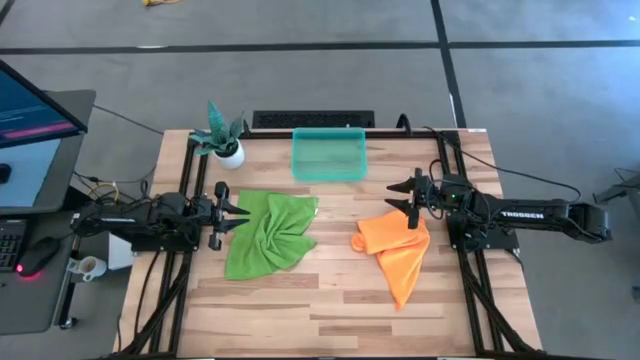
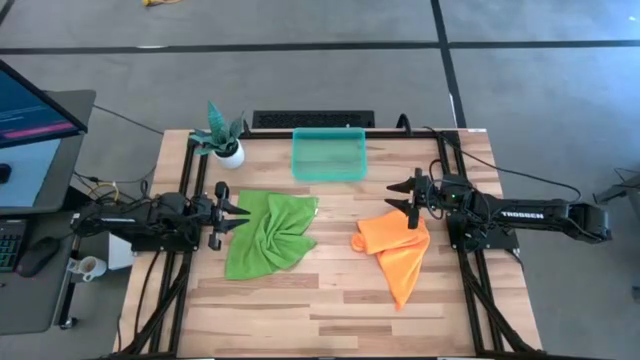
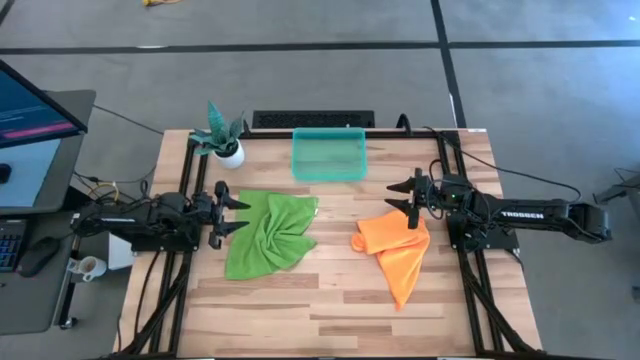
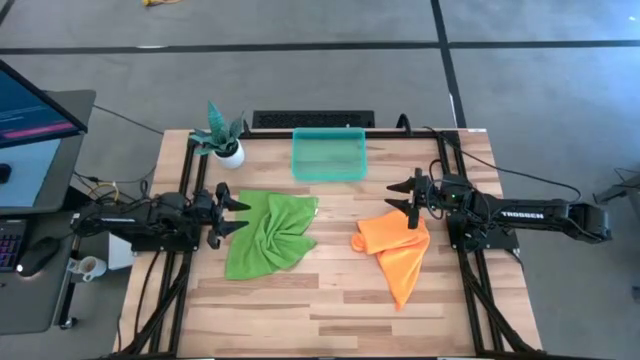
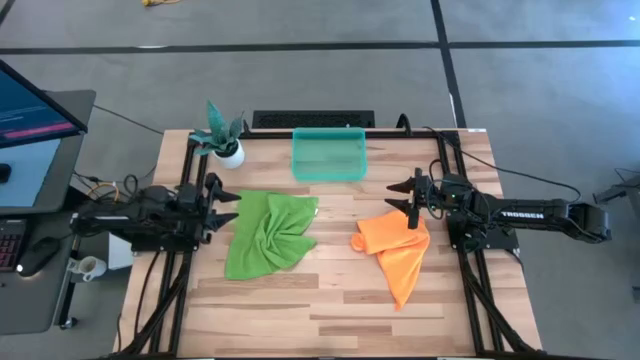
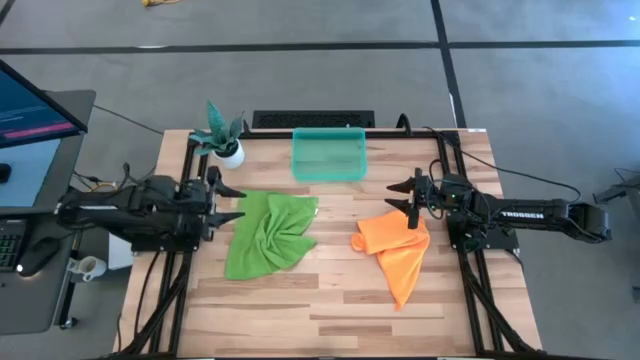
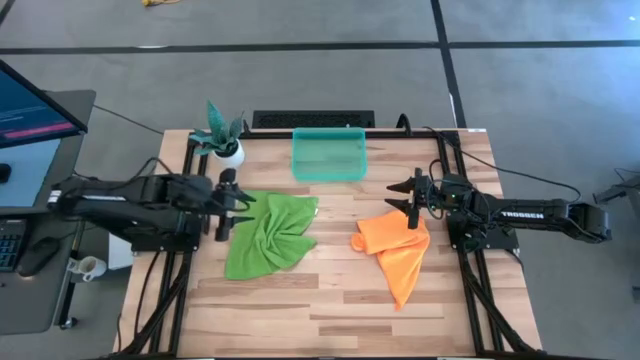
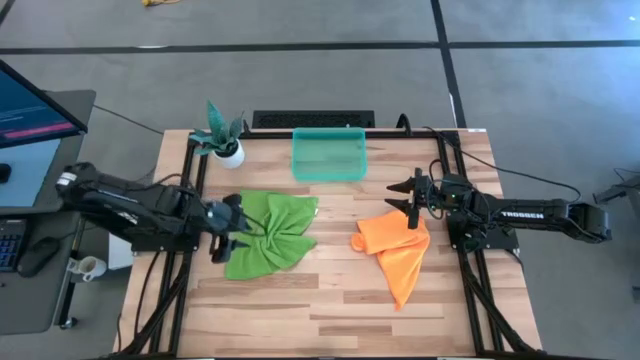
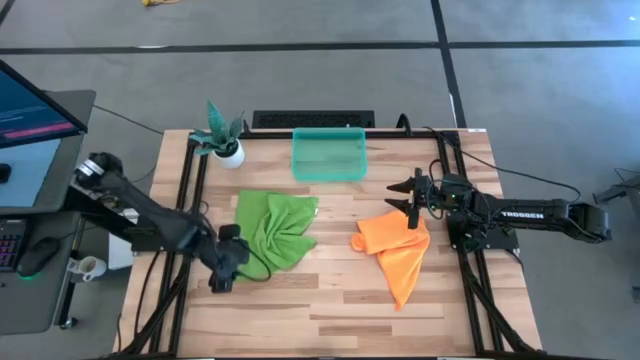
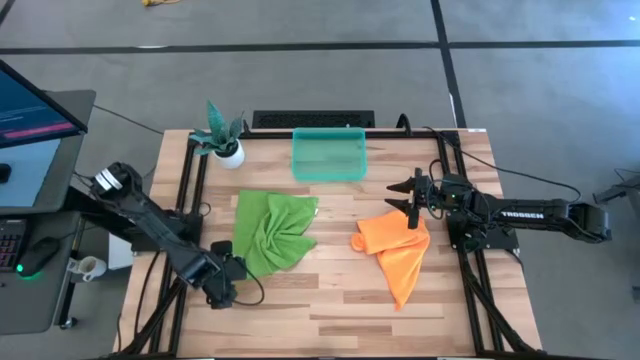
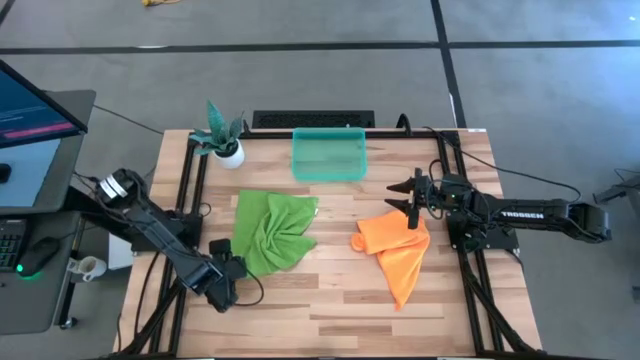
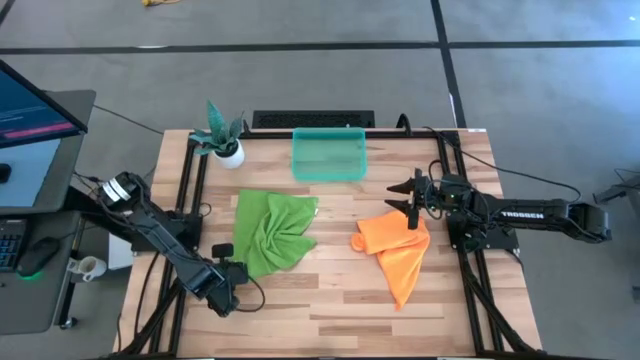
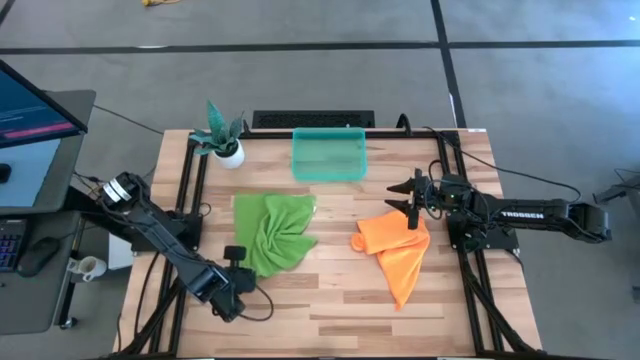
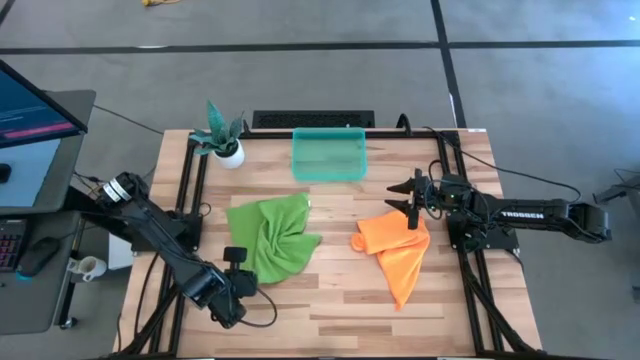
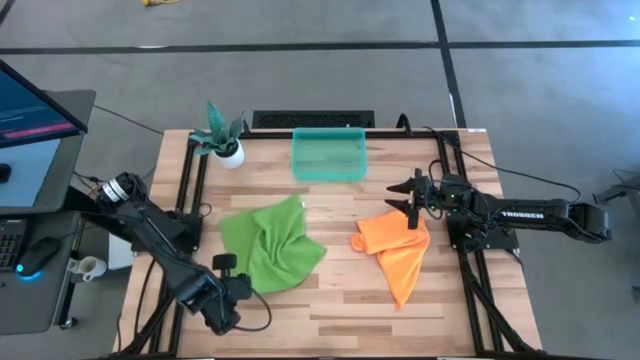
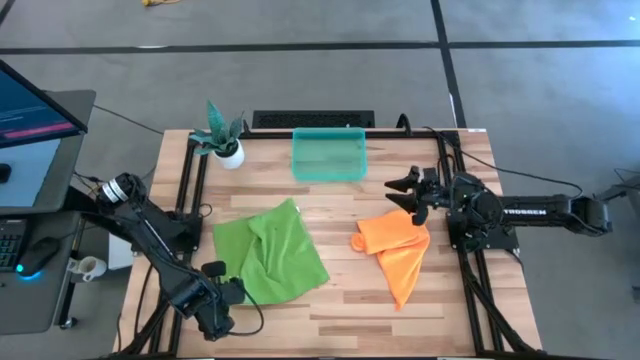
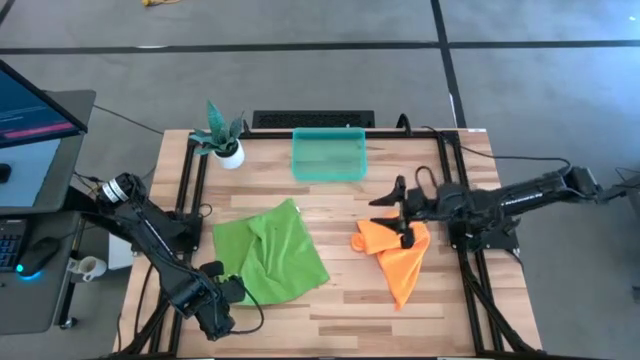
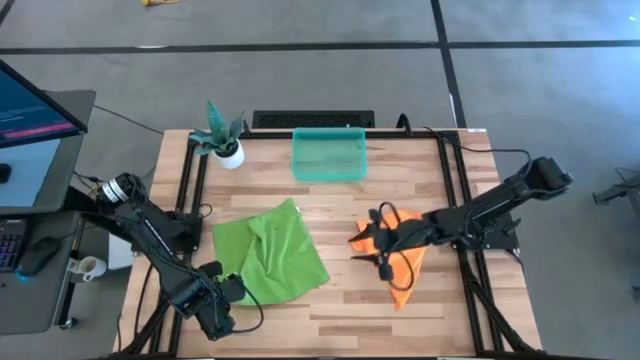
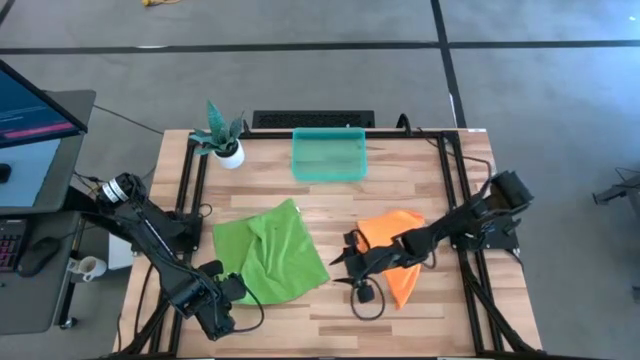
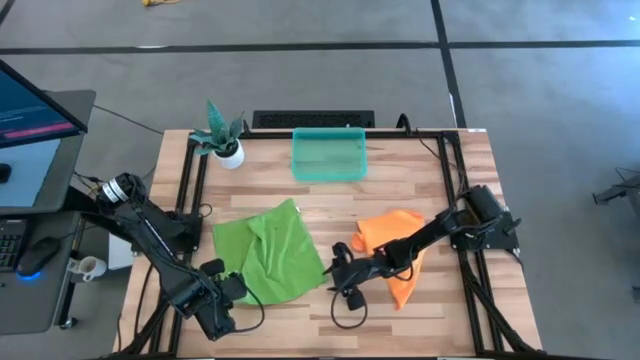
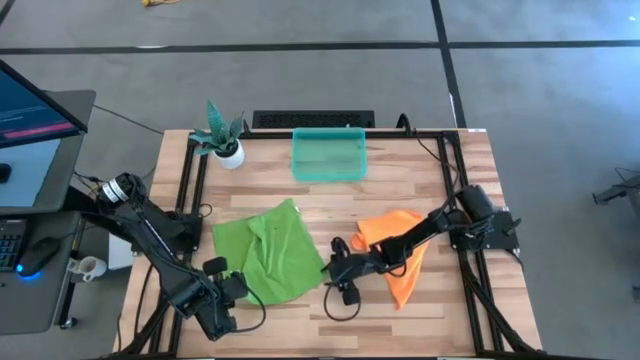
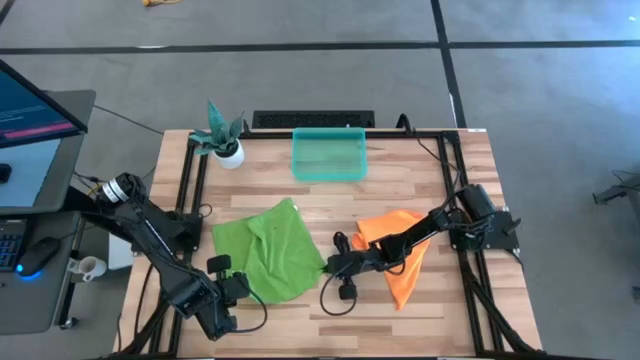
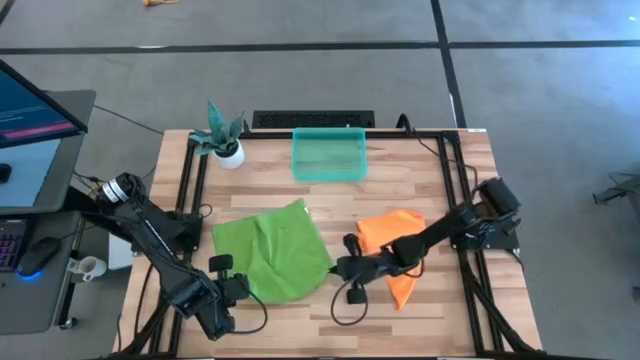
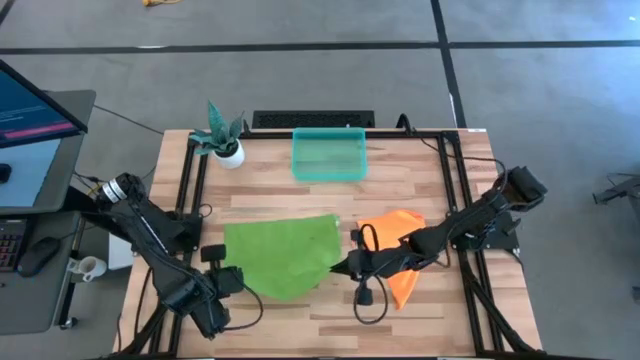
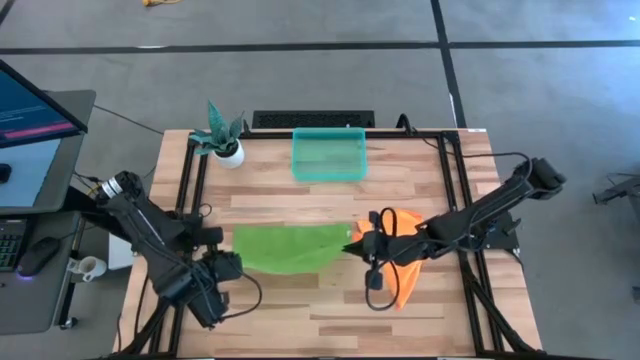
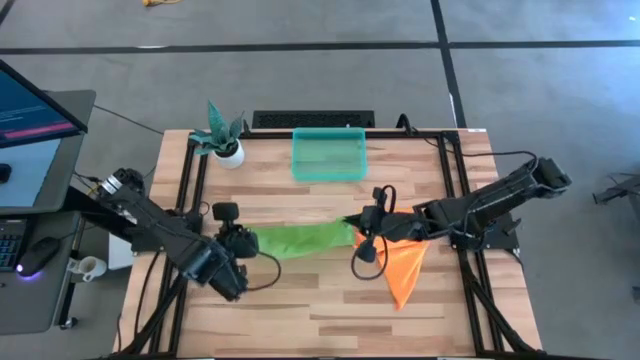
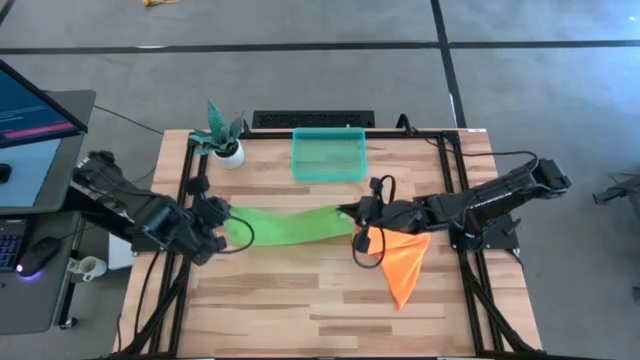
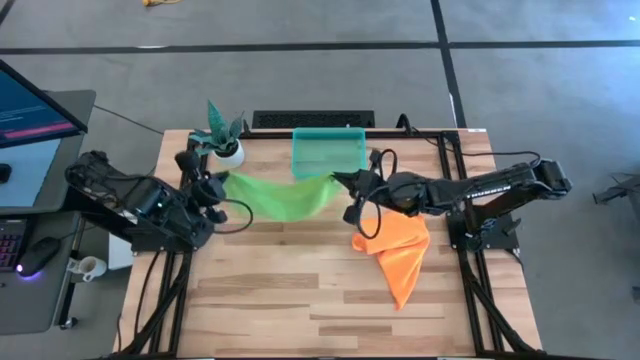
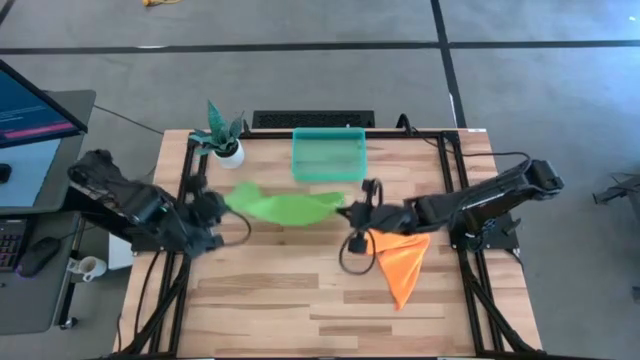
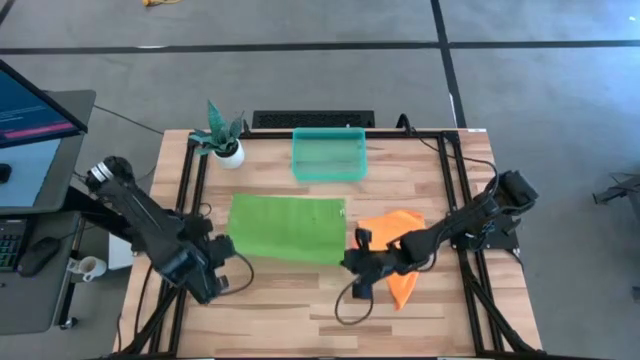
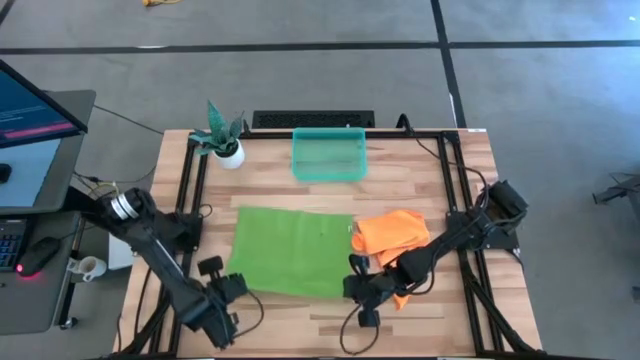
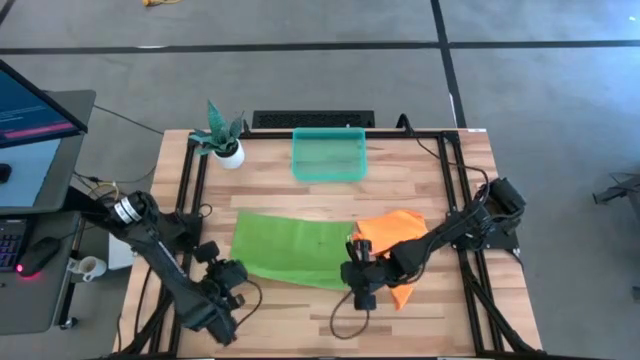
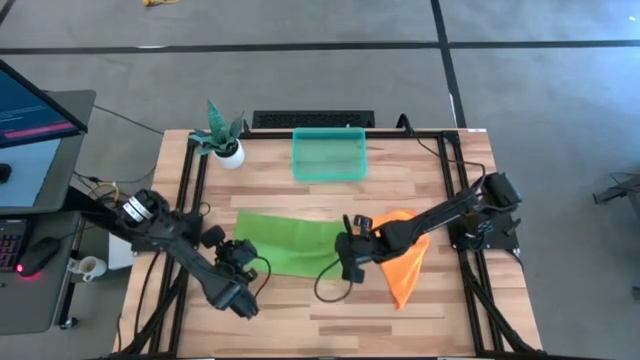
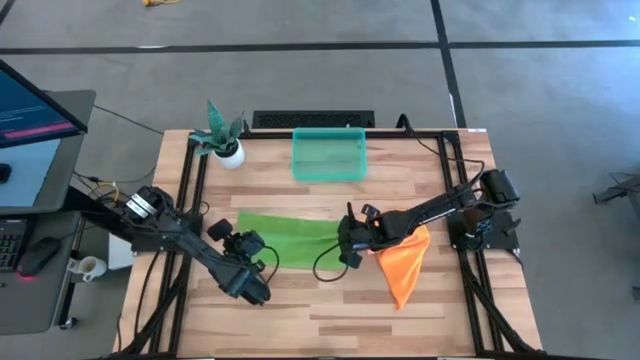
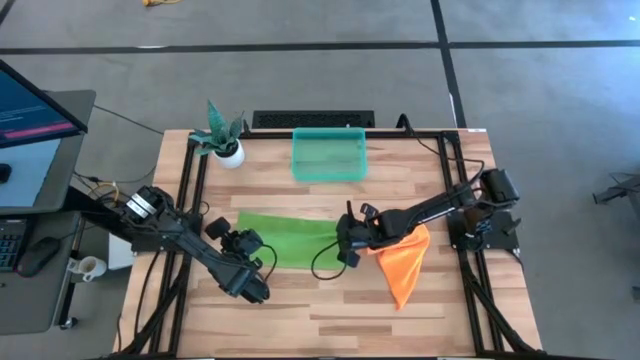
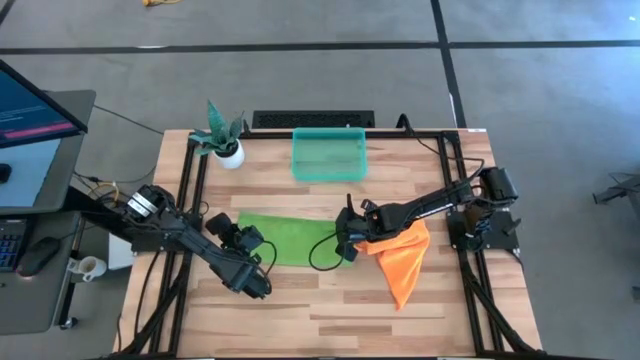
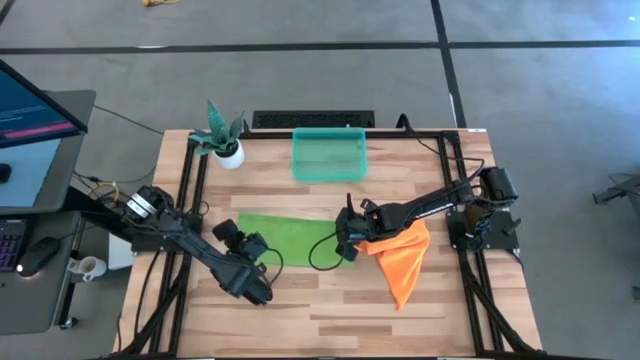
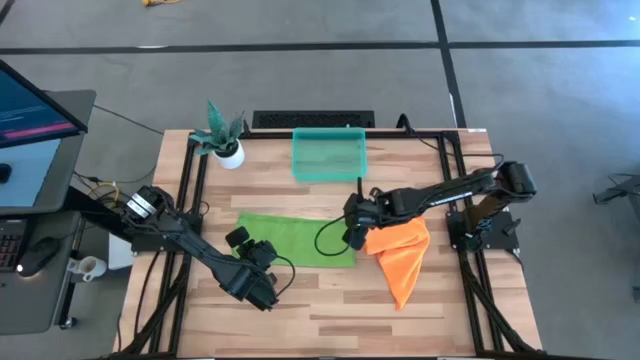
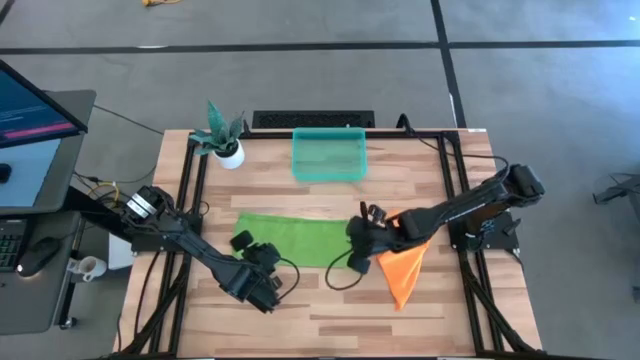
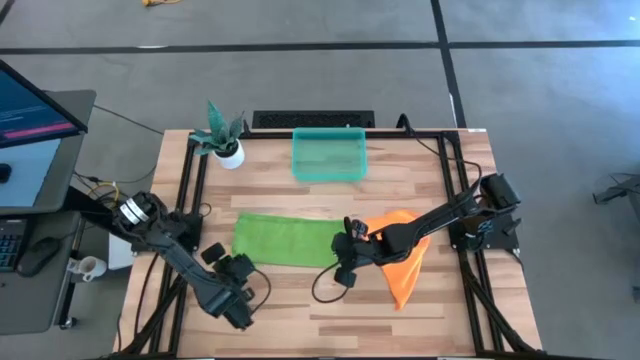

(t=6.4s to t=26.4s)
Task: Roll towel into tight, uniform cylinder
Roll the green microfiber towel
